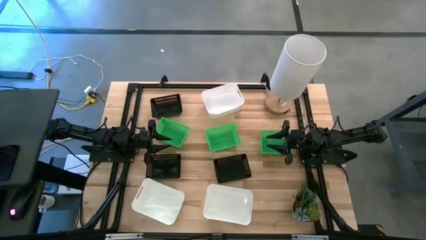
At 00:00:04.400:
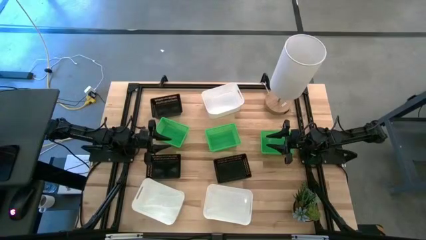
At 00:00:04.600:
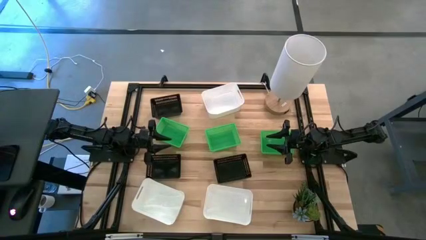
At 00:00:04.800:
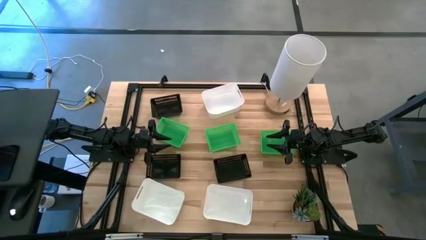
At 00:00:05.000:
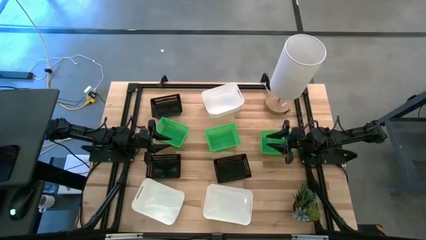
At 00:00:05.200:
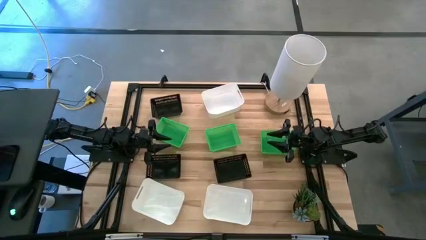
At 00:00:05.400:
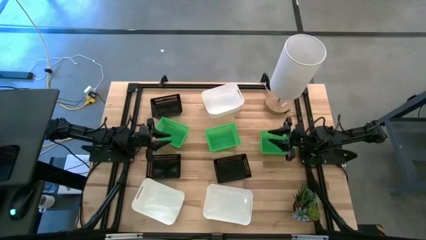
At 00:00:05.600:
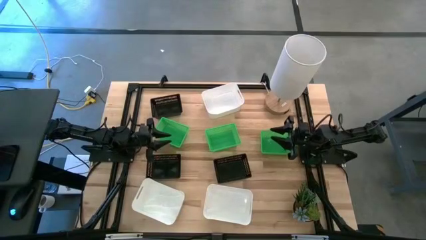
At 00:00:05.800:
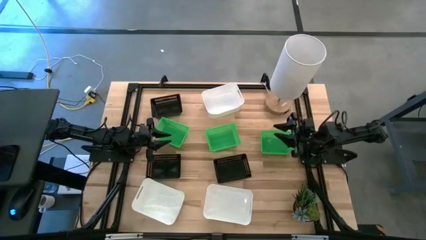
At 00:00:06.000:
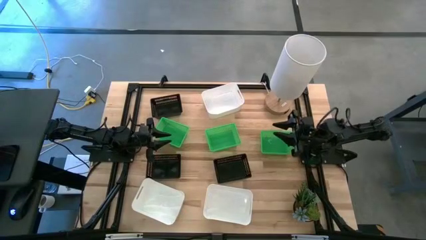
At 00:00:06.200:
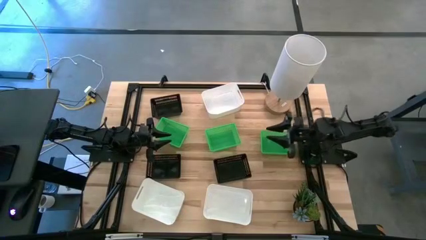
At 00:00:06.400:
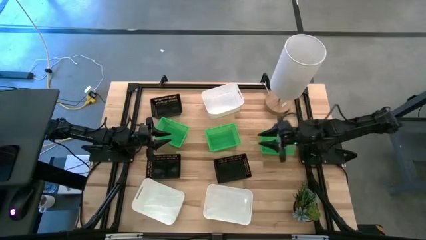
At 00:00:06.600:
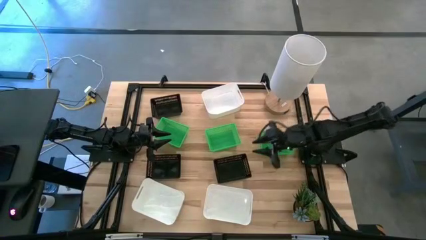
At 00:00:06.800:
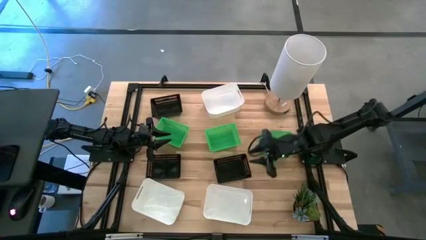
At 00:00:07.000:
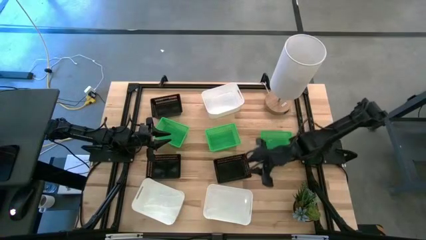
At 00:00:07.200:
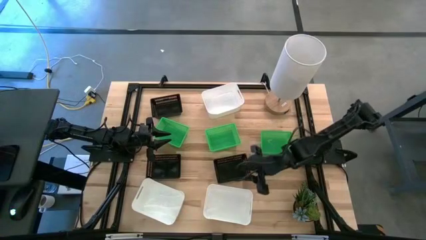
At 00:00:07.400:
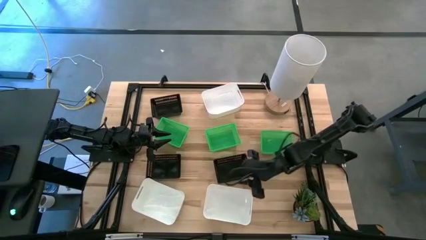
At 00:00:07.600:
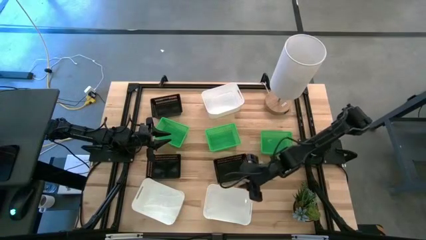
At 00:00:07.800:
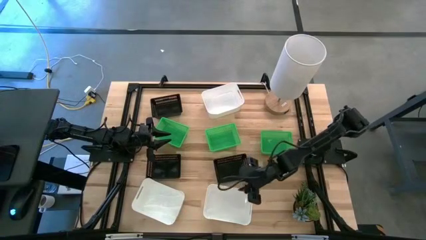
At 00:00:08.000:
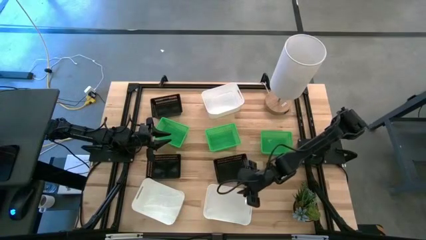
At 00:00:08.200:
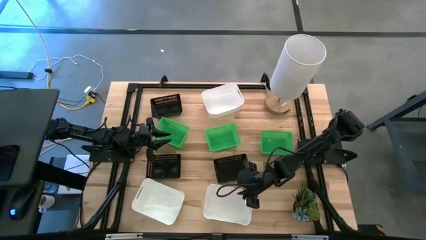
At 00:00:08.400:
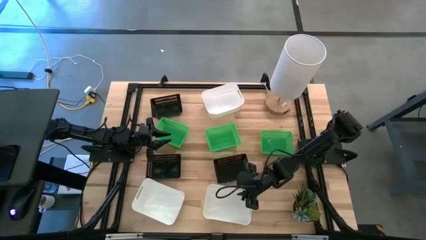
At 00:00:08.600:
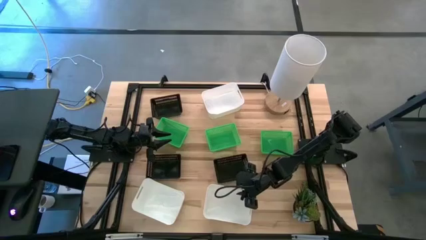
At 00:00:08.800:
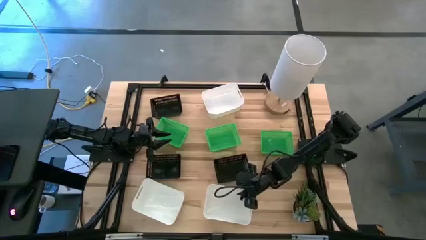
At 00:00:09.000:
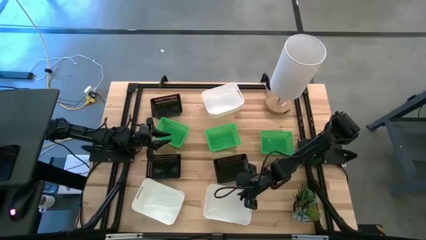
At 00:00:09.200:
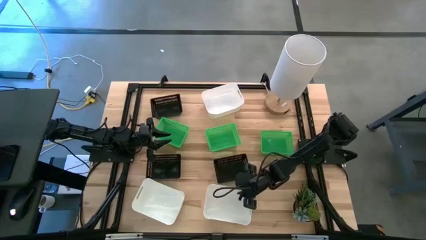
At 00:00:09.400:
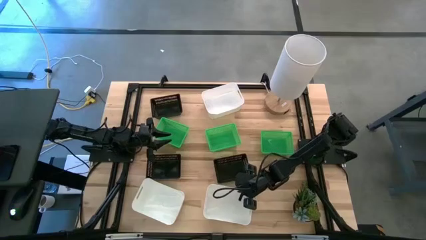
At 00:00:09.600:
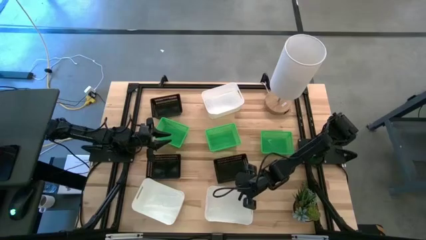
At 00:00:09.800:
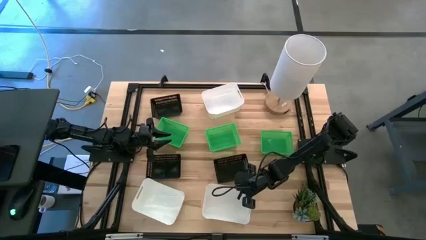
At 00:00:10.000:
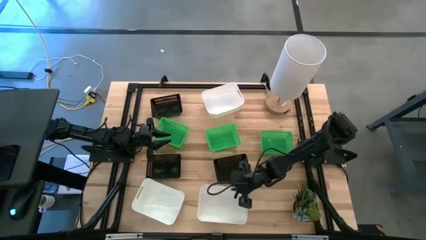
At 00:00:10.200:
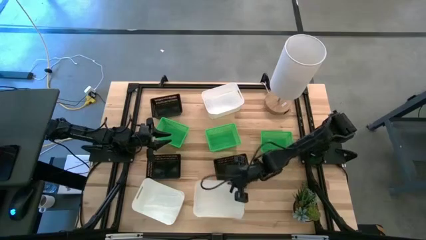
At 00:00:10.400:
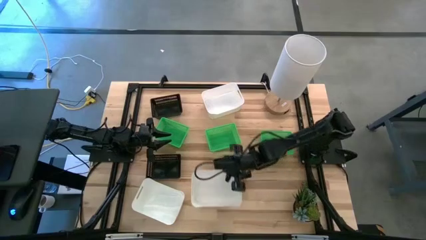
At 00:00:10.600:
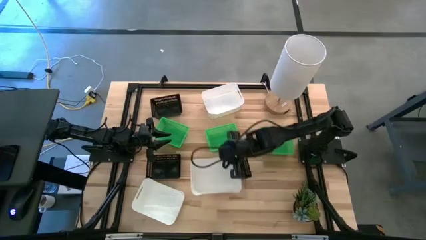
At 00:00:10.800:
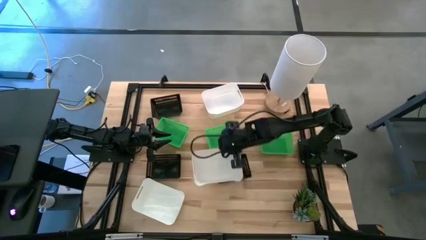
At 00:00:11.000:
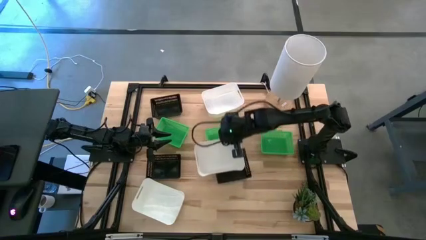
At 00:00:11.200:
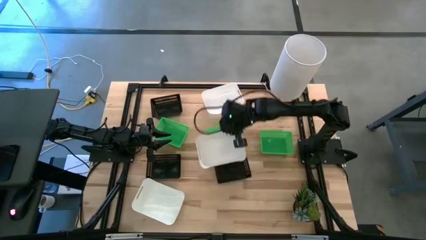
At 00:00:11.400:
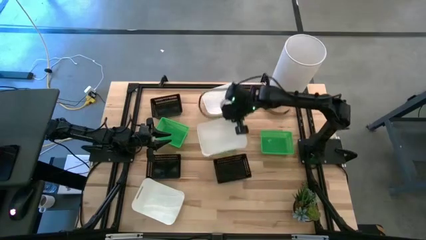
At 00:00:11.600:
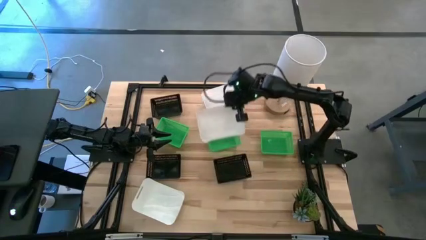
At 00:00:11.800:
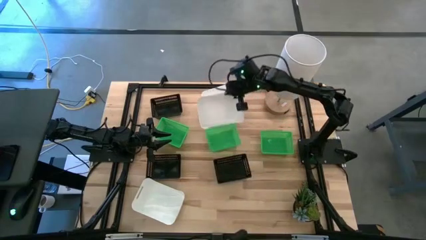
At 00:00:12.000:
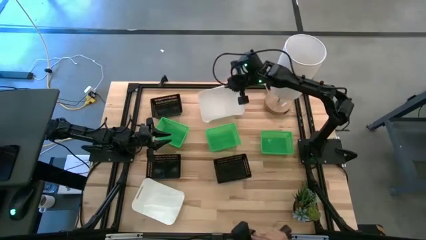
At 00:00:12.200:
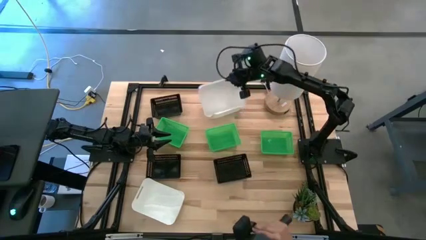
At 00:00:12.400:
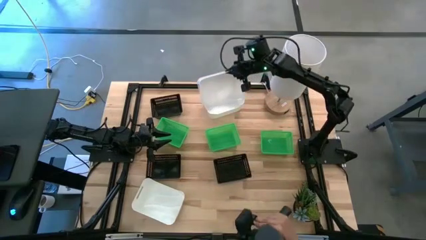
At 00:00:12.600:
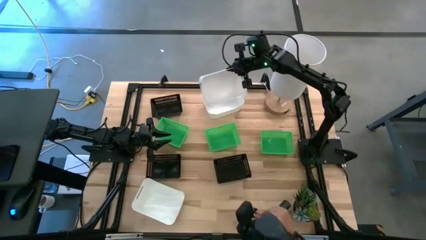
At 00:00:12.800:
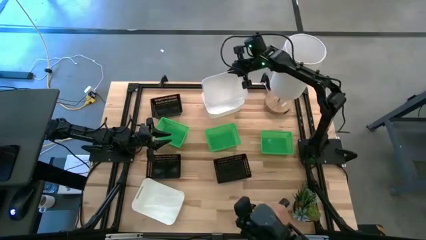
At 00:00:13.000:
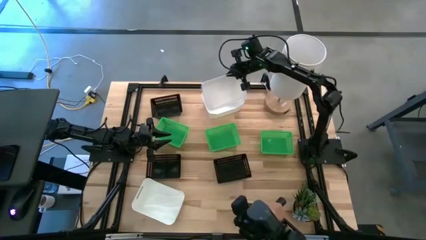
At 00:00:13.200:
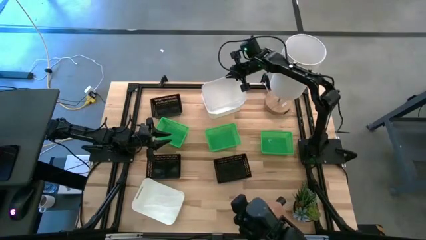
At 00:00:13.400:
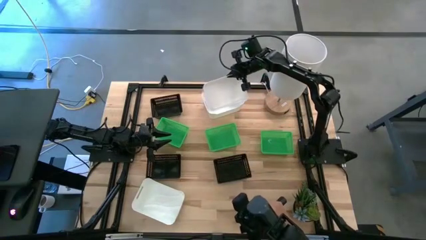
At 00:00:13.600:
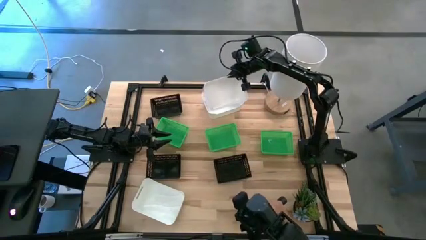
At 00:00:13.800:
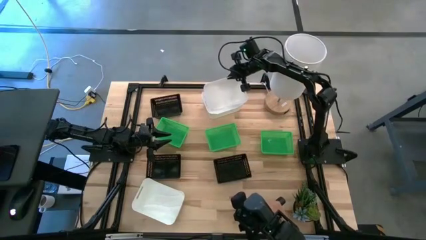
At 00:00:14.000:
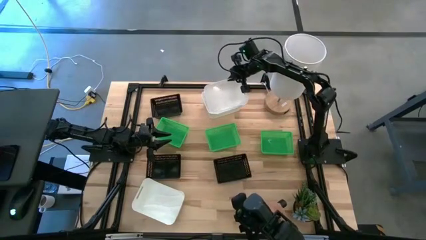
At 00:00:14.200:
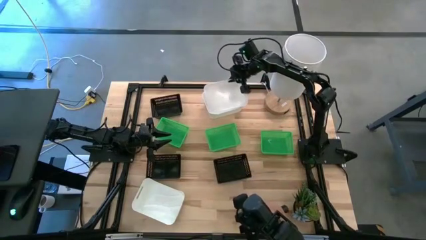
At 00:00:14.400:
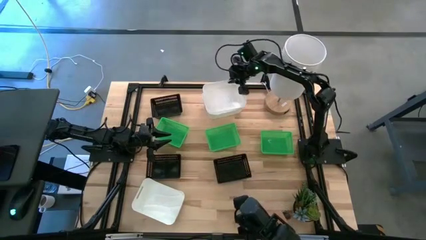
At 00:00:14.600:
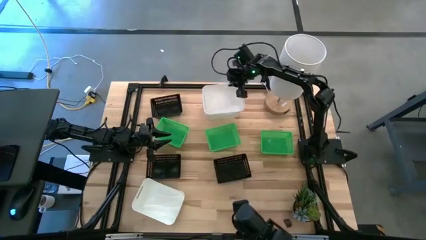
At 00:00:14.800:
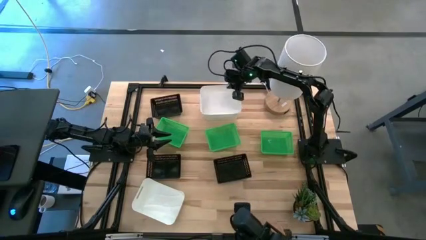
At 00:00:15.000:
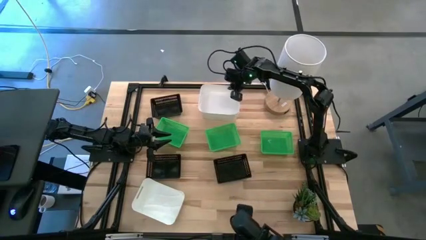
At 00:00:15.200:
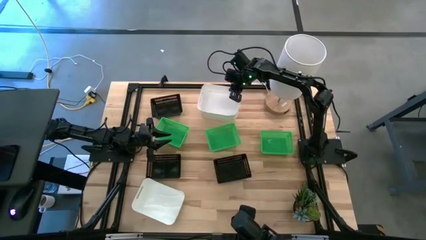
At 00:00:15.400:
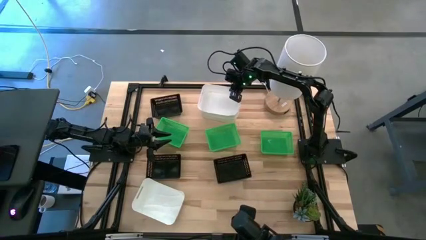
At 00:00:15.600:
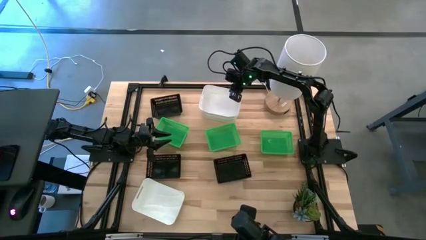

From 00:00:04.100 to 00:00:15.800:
Stack the right white bin on the top white bin

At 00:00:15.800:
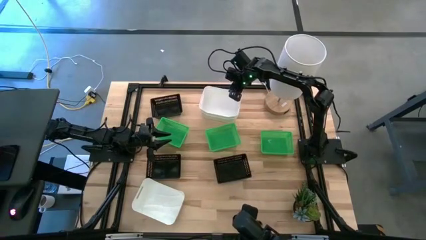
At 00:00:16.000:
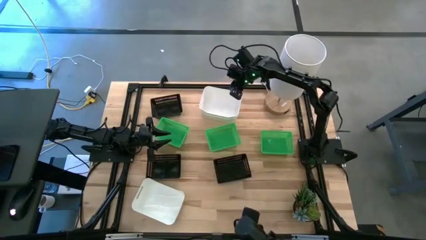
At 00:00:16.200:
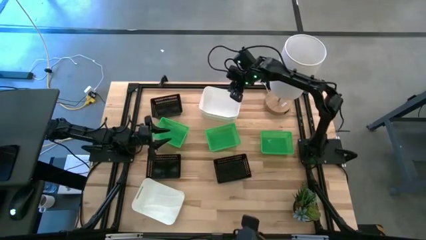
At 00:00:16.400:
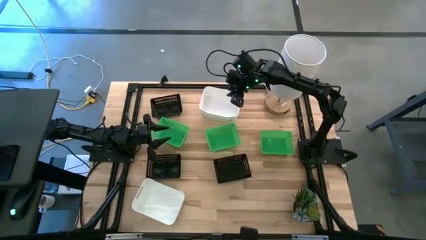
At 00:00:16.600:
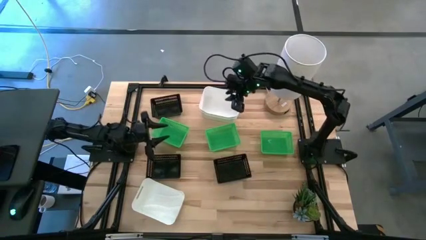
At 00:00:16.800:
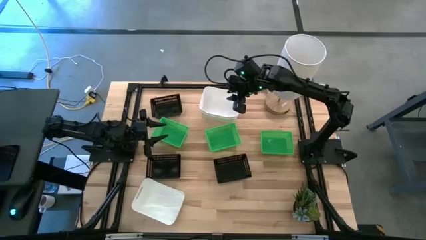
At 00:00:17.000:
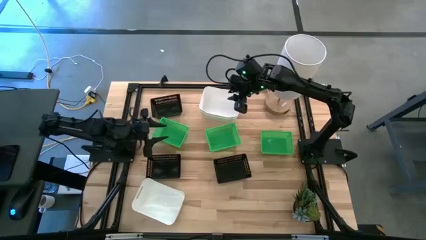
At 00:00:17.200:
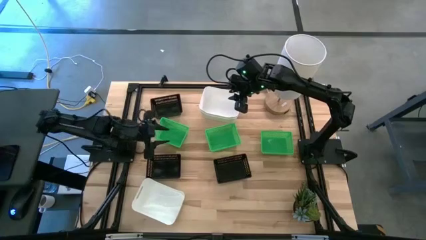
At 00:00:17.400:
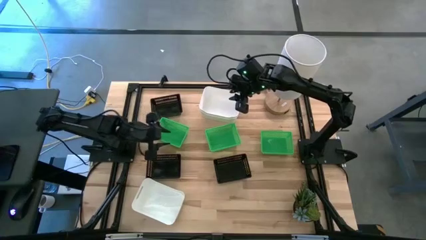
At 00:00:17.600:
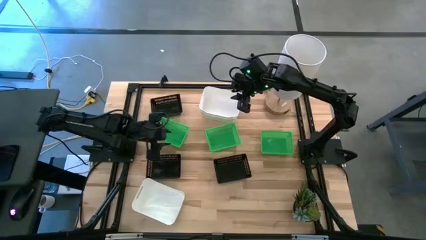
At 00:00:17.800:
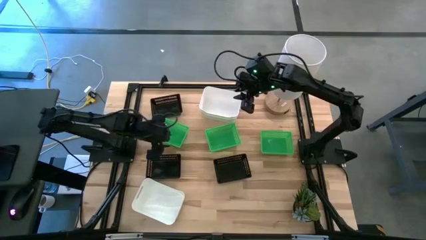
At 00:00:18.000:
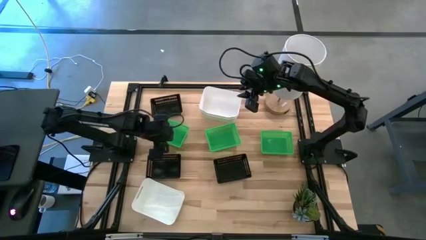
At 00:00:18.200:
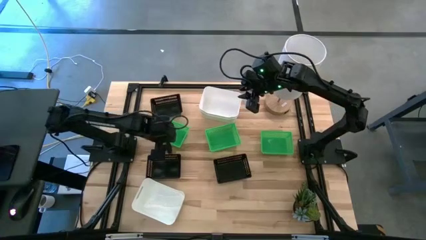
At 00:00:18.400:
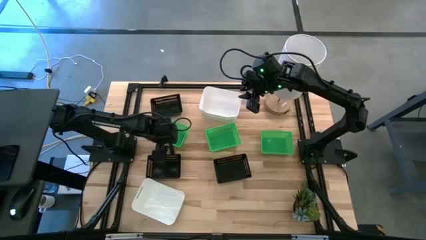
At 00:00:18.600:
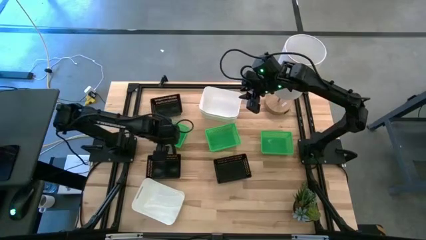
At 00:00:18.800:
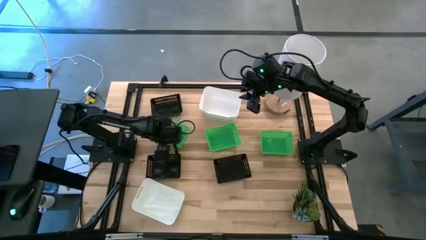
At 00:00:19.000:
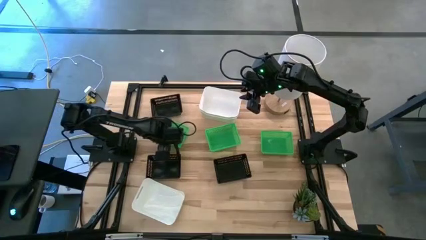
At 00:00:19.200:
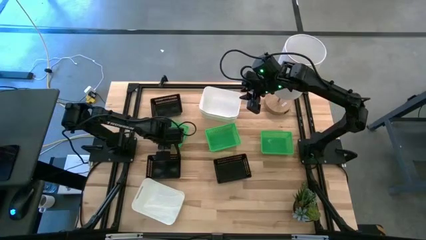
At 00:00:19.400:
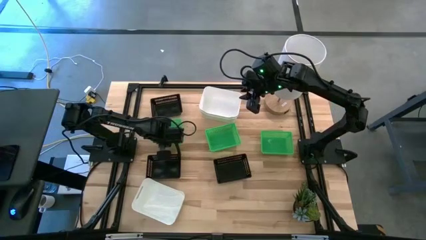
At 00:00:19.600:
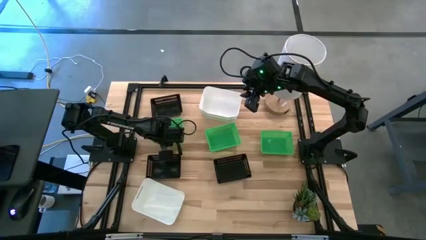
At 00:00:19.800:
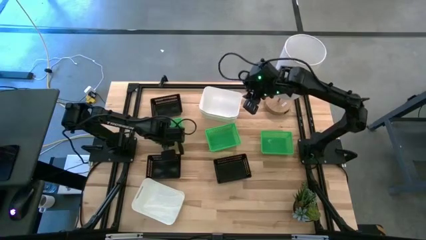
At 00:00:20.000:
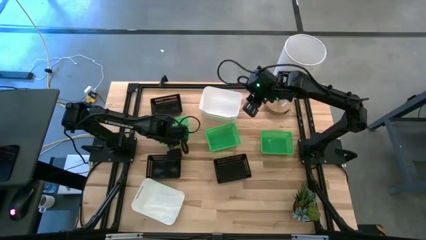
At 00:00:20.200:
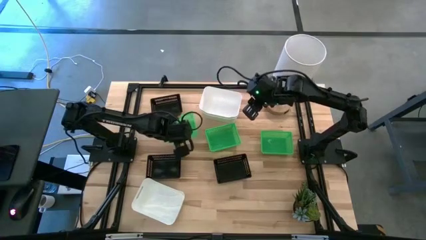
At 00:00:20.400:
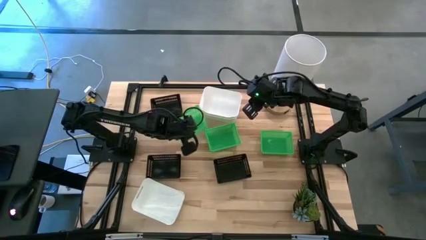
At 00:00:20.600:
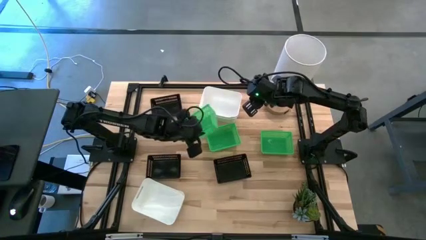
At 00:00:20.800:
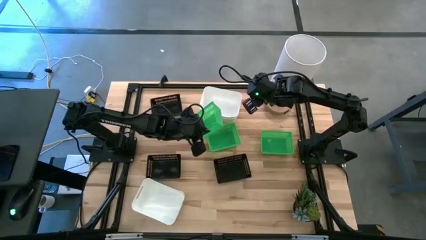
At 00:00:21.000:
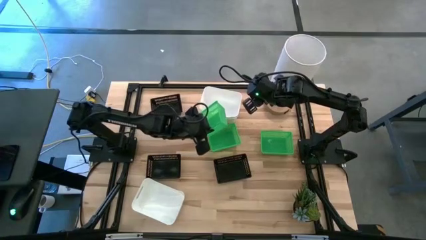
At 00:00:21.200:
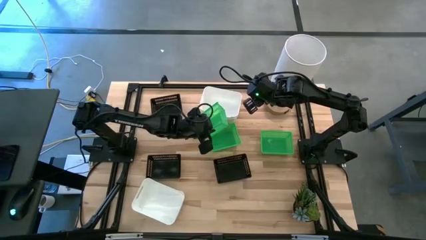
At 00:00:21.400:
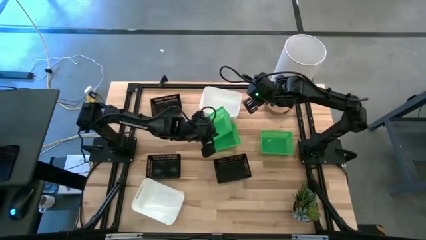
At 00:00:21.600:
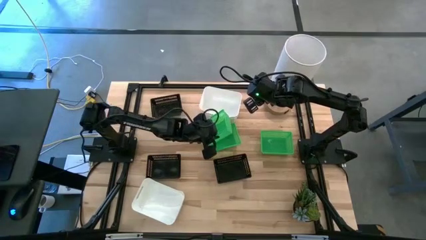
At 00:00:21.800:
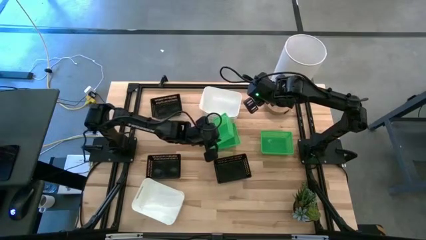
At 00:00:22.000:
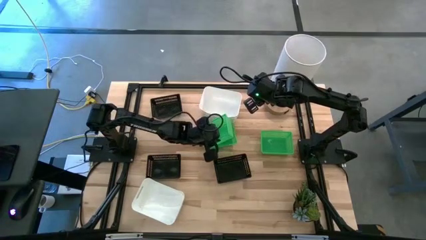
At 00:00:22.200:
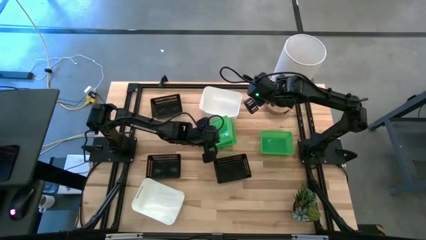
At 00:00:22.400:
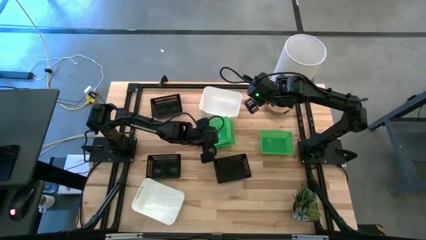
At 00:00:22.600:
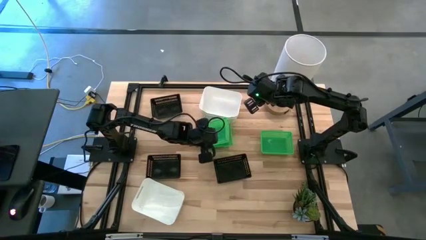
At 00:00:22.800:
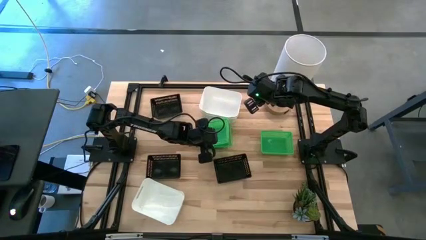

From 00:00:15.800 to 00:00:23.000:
Stack the left green bin on the middle green bin
